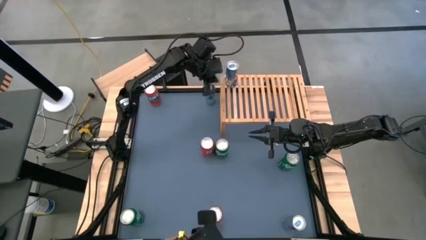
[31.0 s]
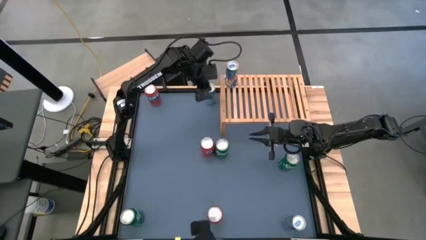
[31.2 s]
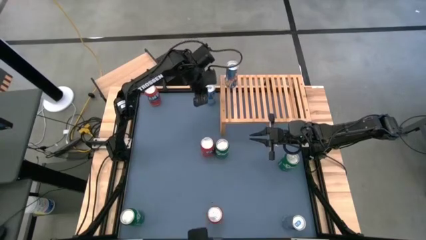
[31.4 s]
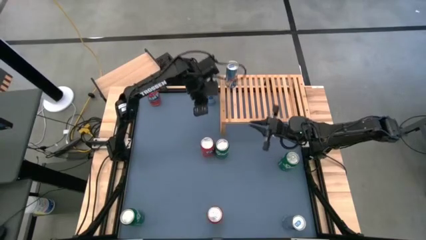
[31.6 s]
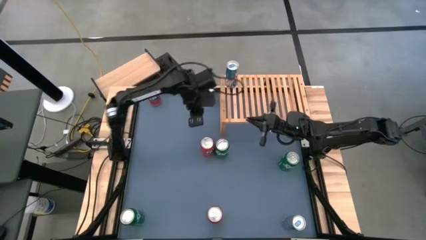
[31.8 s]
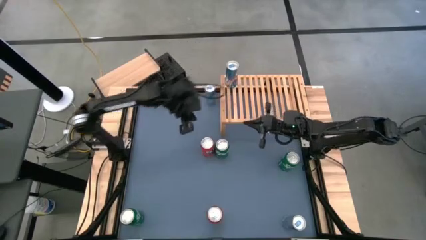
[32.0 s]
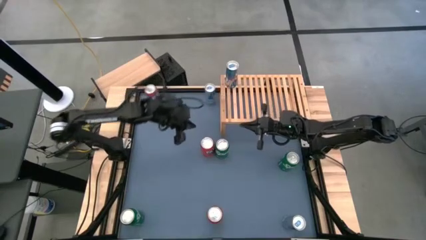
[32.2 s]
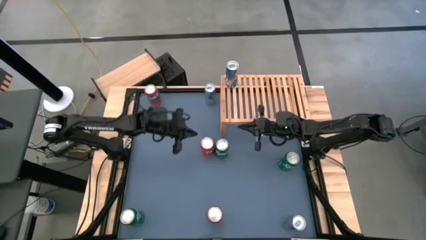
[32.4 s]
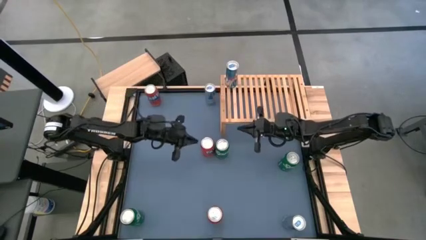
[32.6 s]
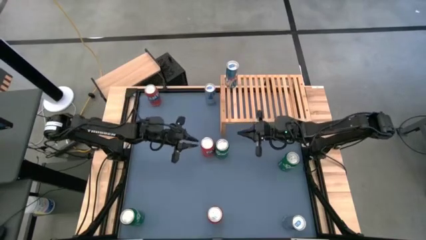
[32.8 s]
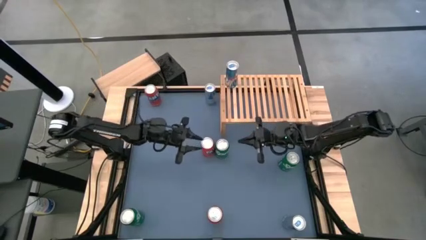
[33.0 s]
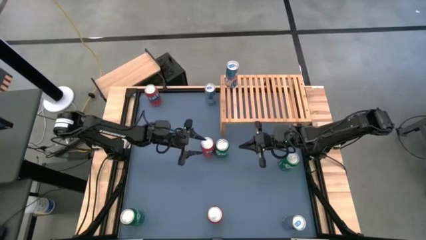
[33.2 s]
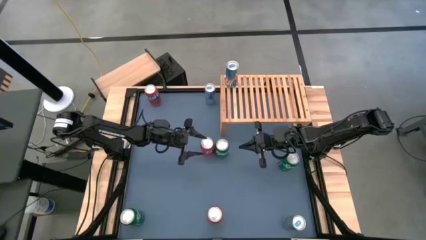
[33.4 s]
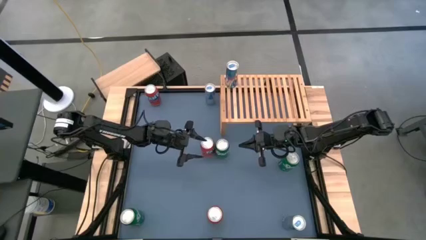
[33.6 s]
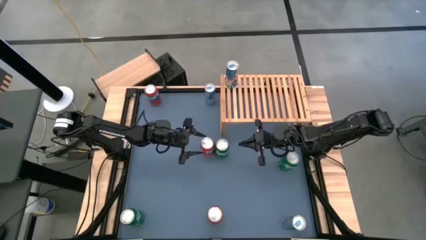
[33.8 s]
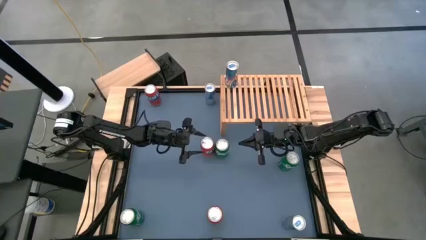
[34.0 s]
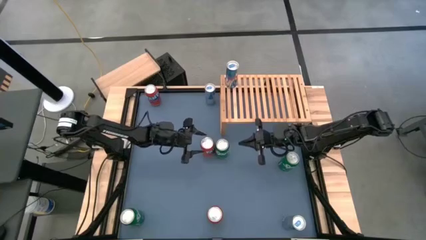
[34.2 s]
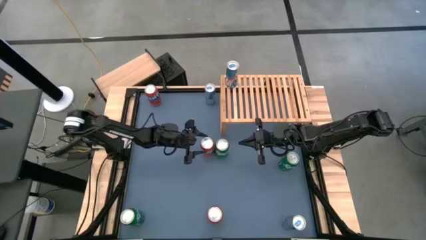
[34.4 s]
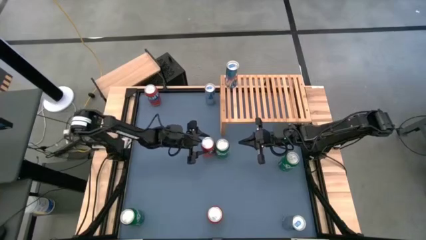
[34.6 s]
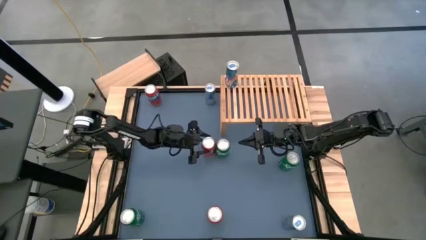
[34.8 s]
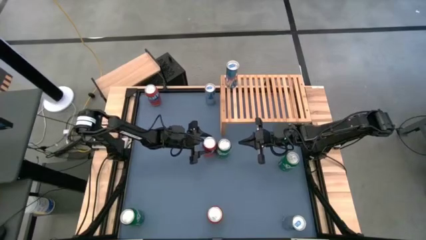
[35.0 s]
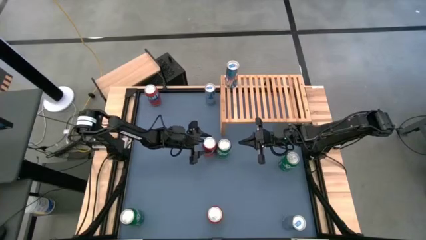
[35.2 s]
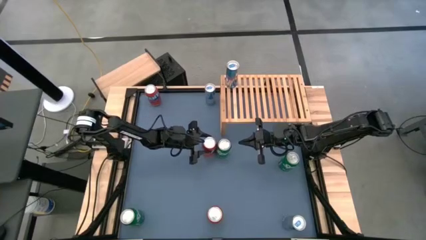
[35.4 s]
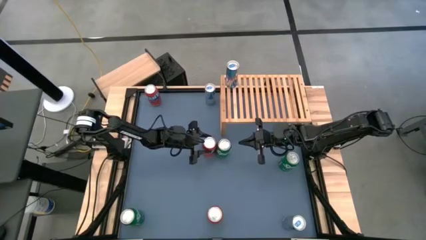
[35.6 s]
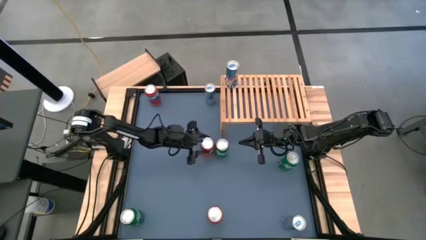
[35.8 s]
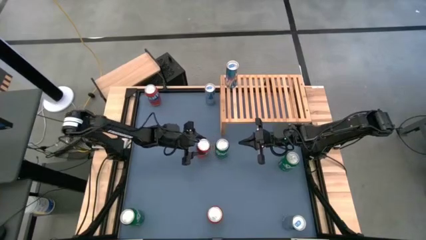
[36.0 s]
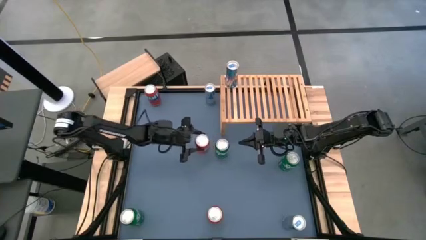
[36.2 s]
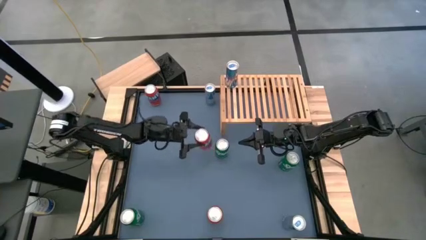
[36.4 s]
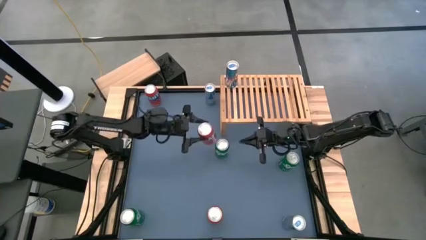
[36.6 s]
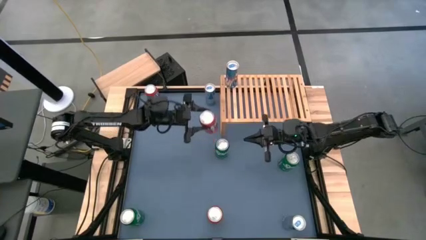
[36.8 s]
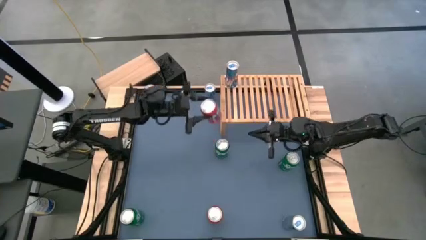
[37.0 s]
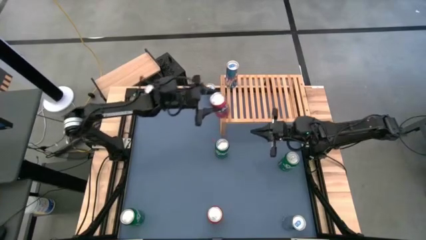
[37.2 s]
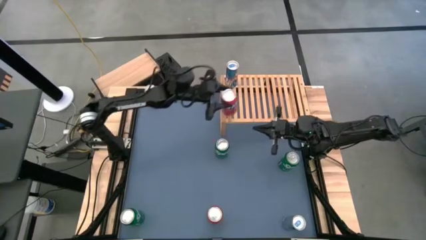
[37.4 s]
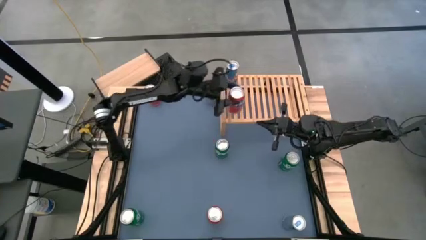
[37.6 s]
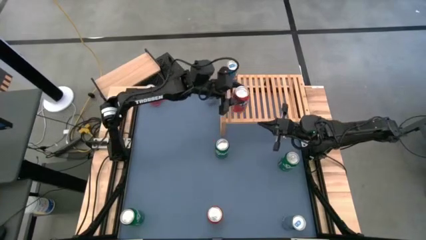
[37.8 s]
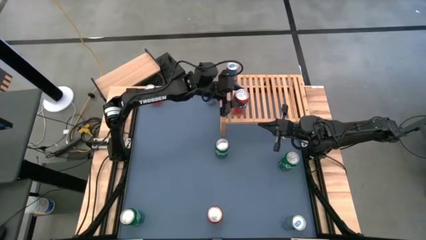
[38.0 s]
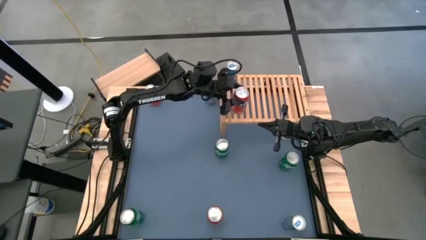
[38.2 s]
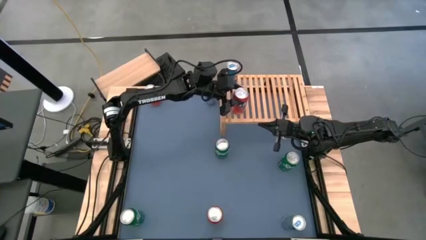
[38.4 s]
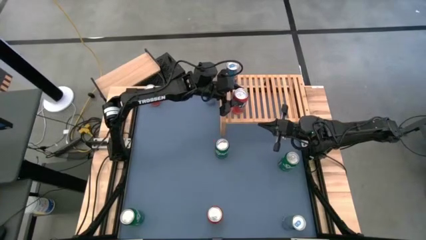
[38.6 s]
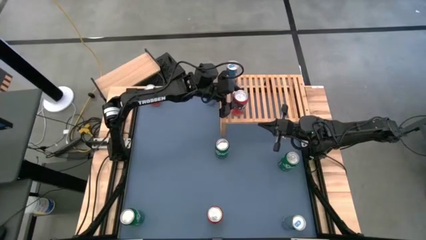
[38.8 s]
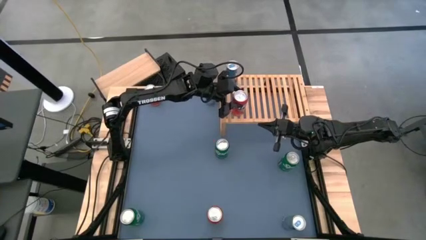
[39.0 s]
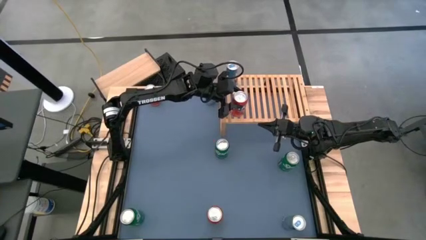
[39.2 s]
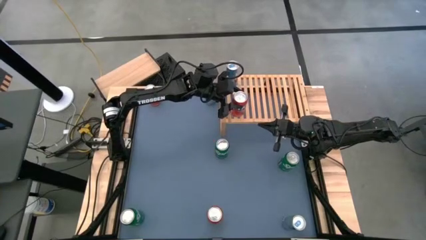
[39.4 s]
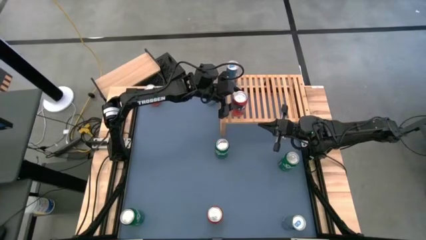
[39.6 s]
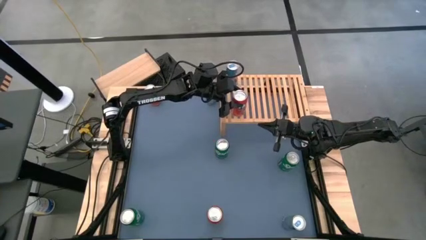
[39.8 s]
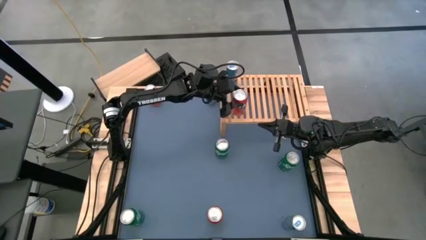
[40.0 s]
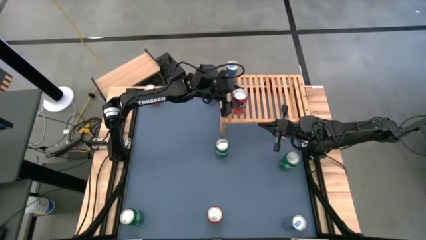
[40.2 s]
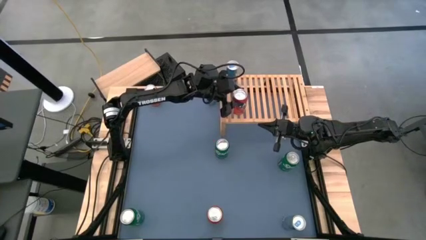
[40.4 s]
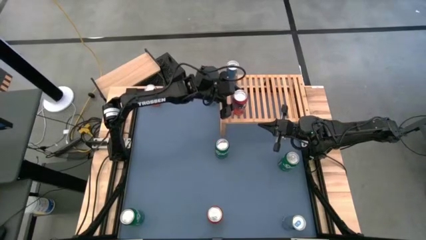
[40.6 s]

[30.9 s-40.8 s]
Task: Place canned beverage on shelf
Put the middle right red soda can on the shelf
